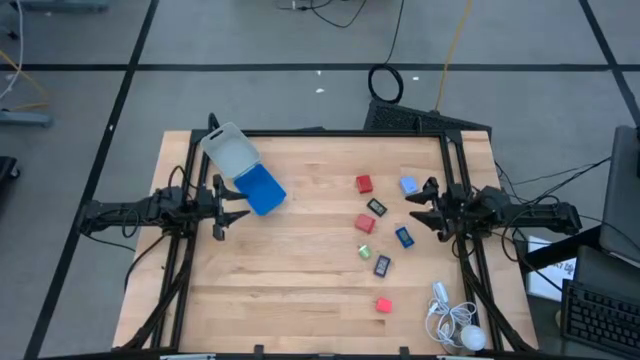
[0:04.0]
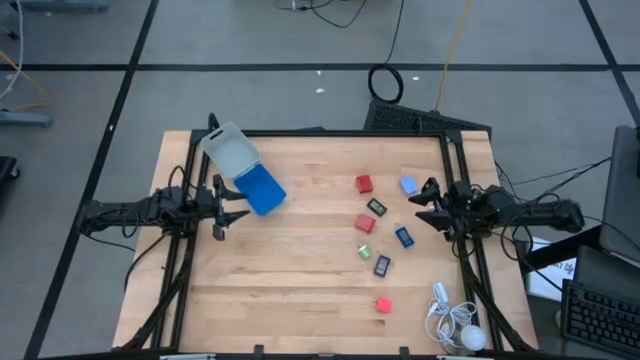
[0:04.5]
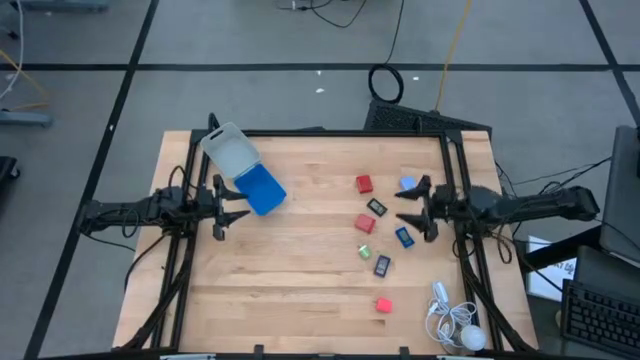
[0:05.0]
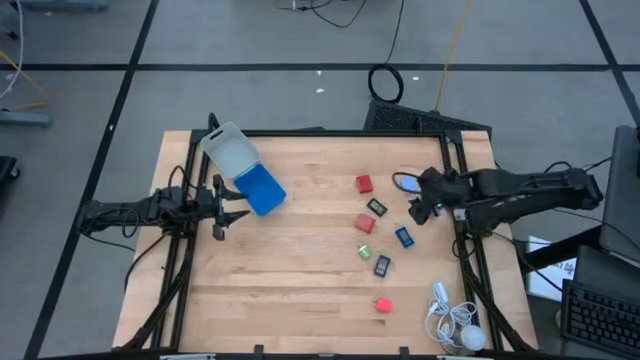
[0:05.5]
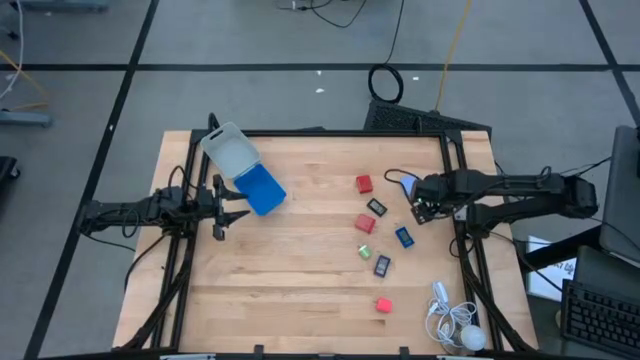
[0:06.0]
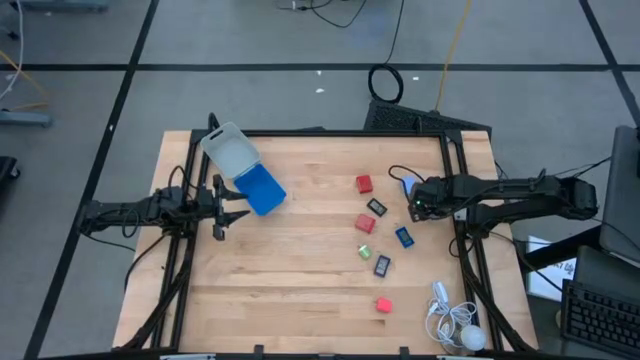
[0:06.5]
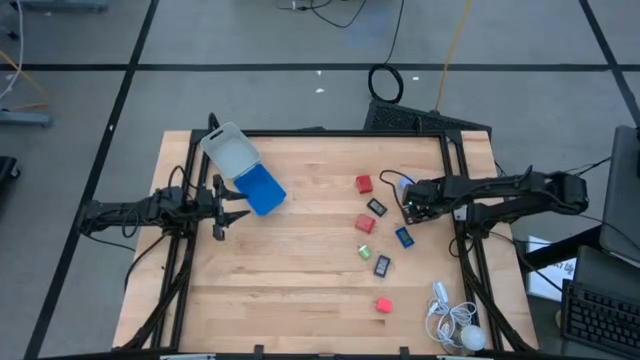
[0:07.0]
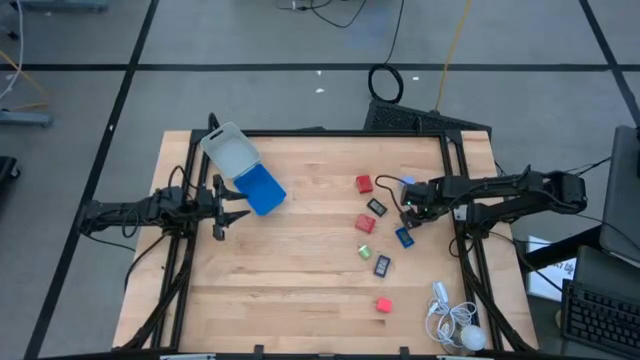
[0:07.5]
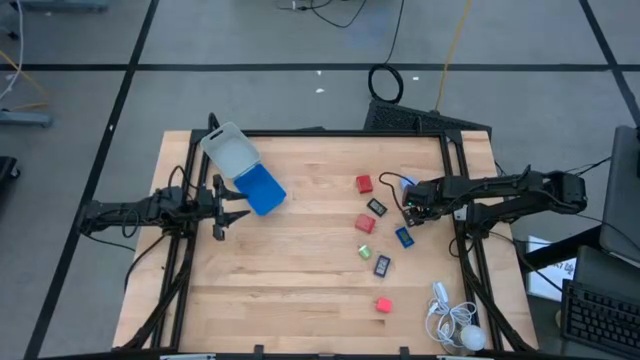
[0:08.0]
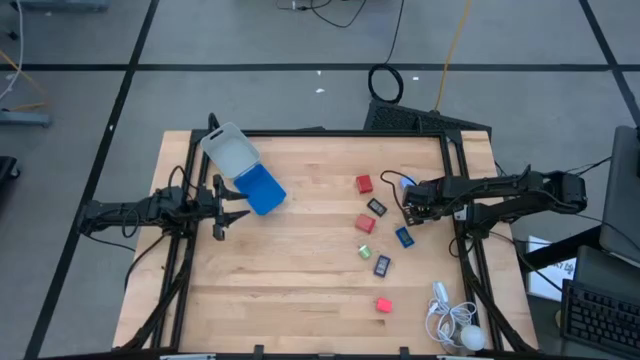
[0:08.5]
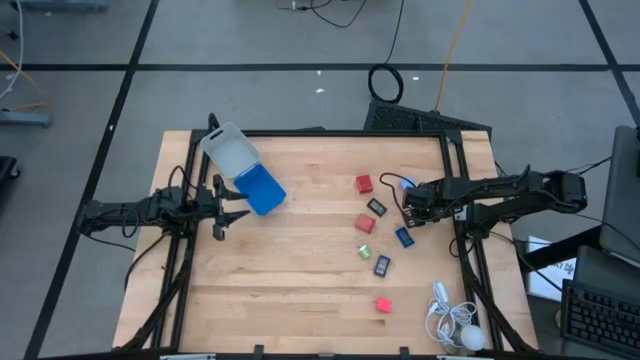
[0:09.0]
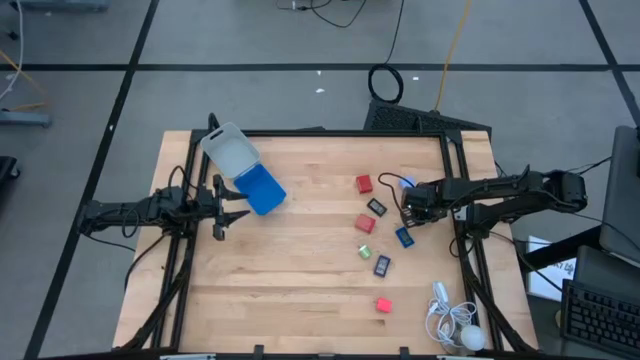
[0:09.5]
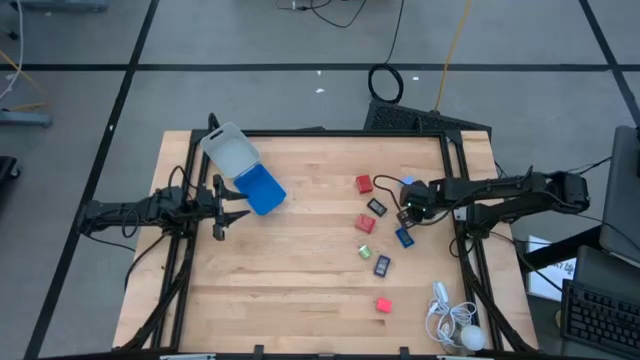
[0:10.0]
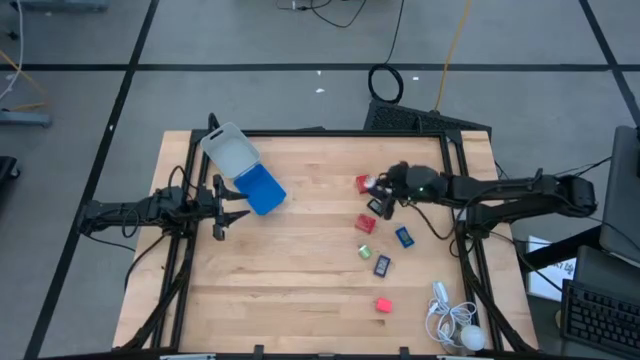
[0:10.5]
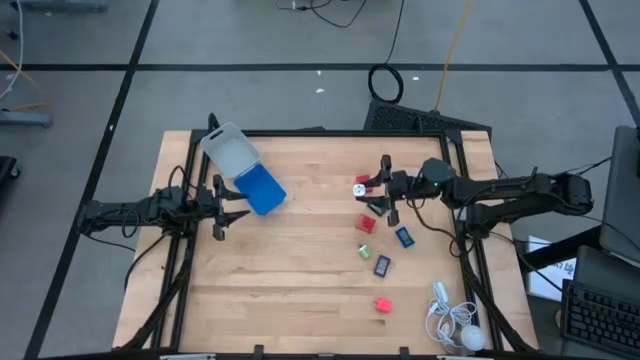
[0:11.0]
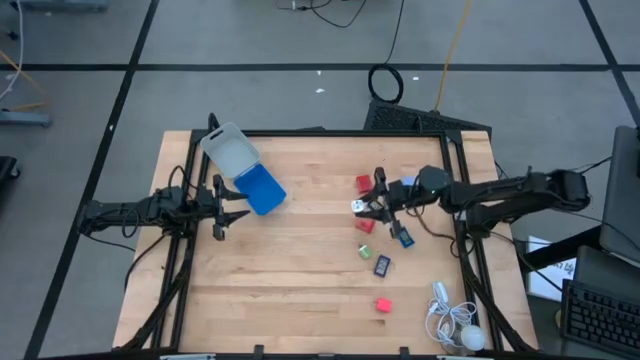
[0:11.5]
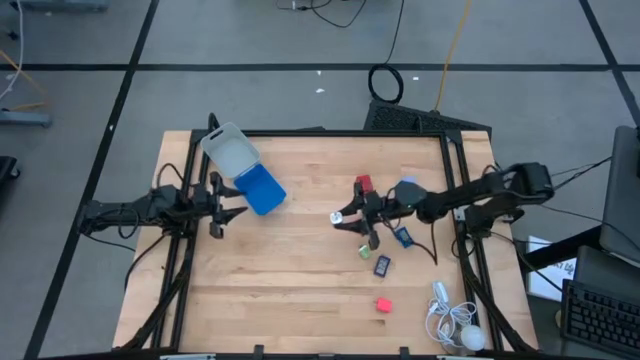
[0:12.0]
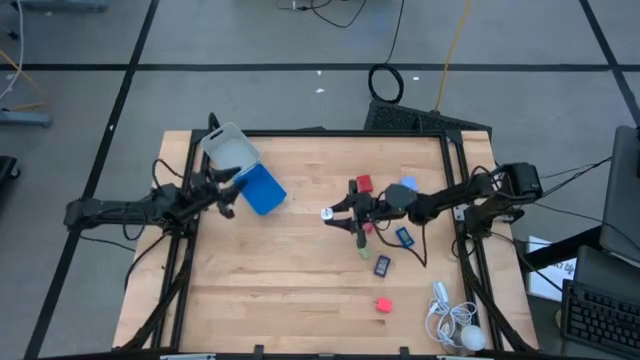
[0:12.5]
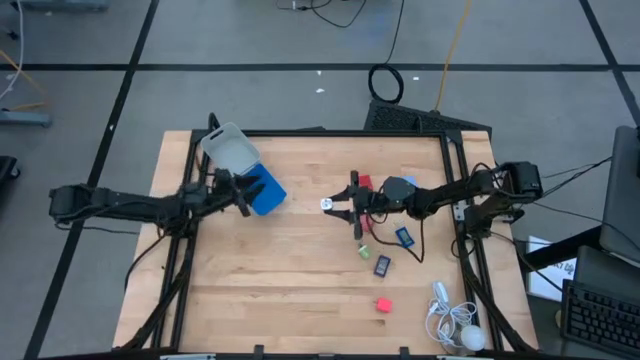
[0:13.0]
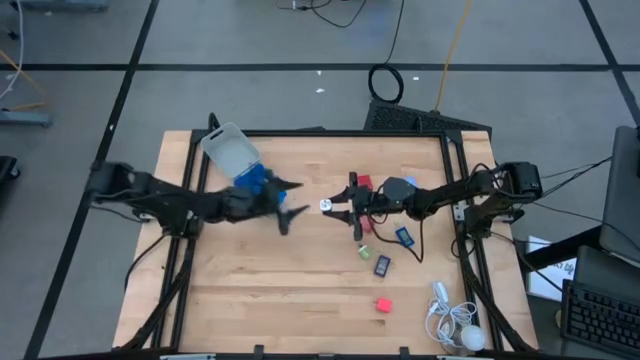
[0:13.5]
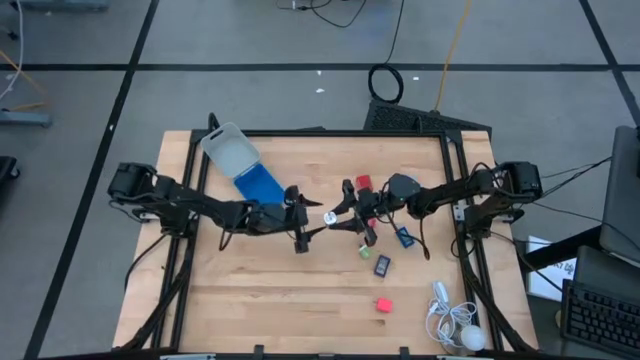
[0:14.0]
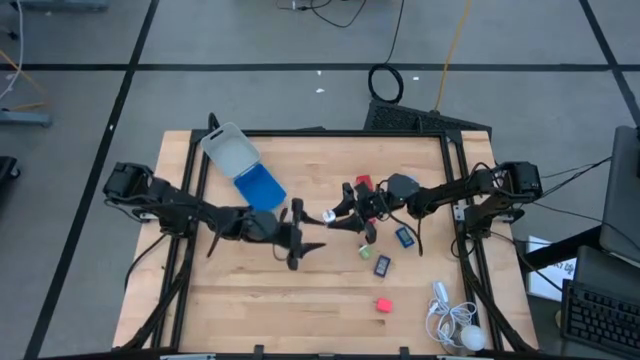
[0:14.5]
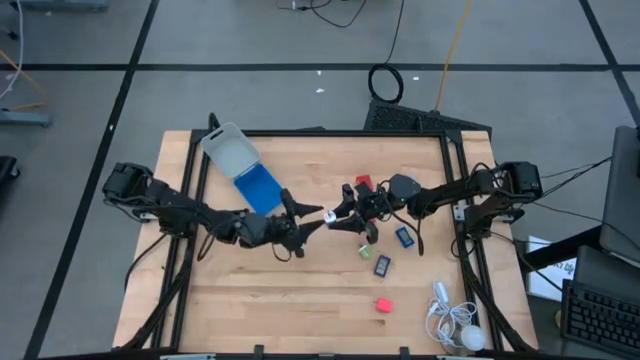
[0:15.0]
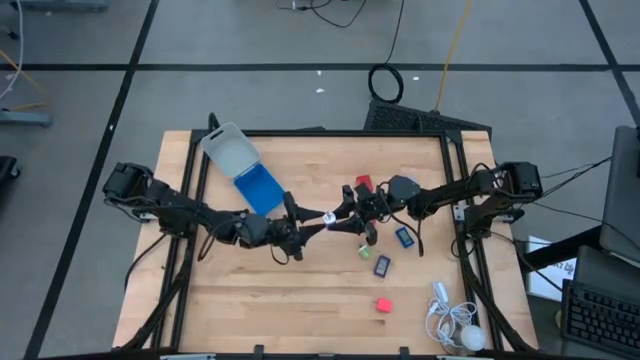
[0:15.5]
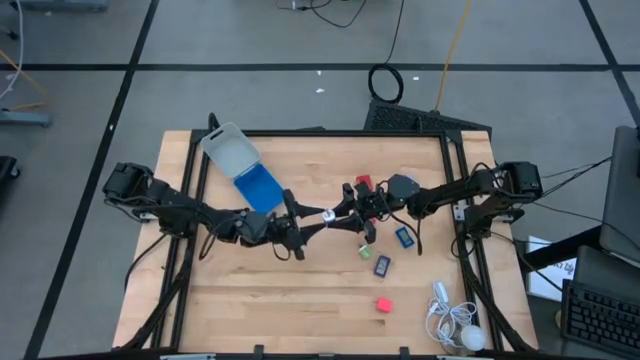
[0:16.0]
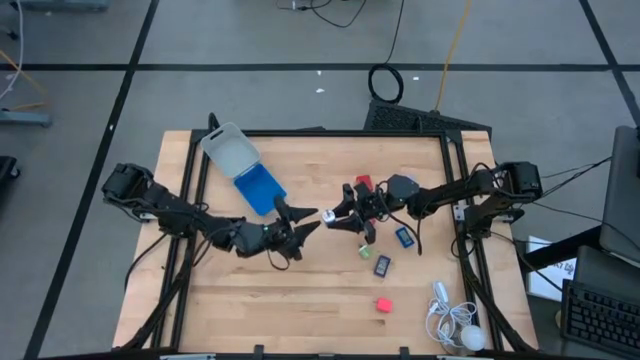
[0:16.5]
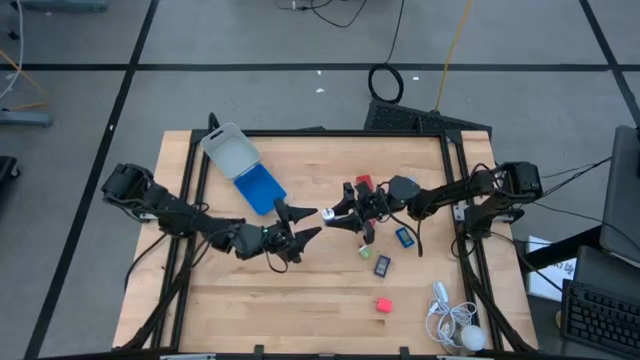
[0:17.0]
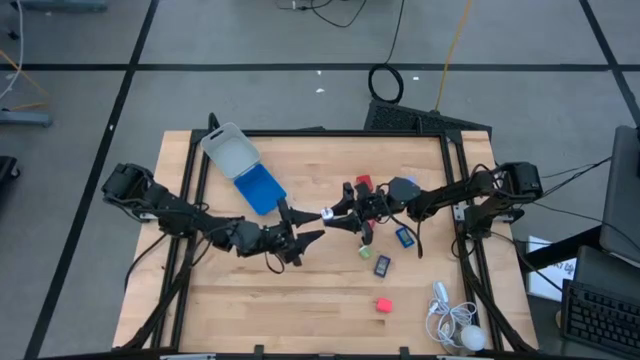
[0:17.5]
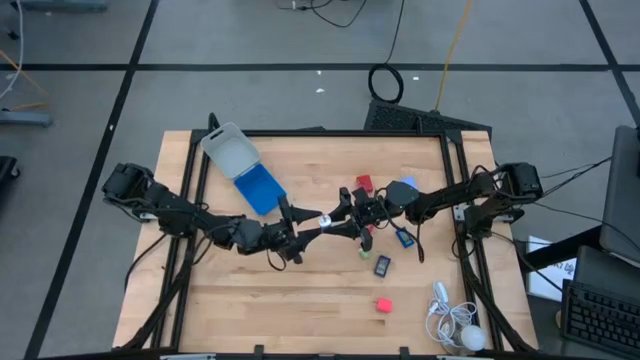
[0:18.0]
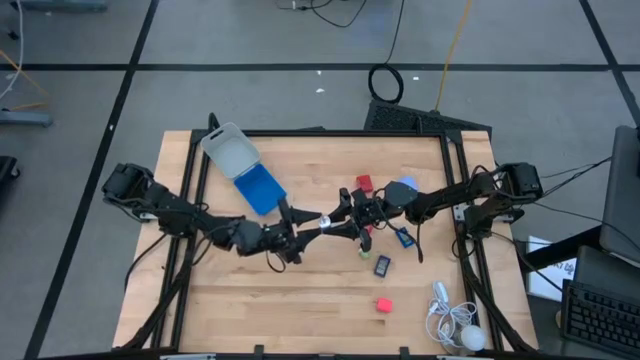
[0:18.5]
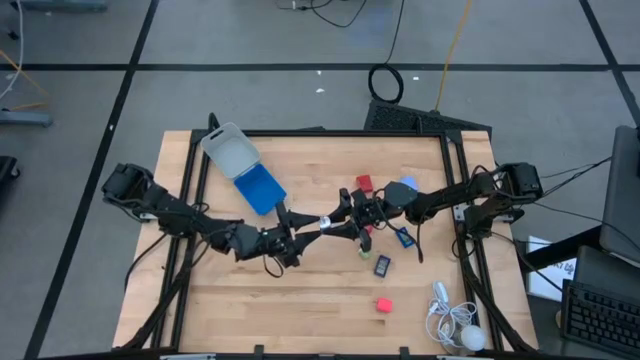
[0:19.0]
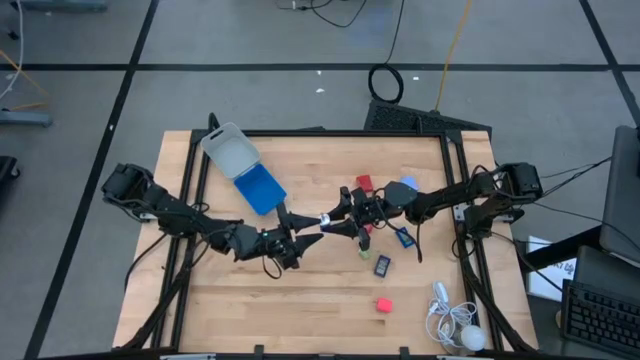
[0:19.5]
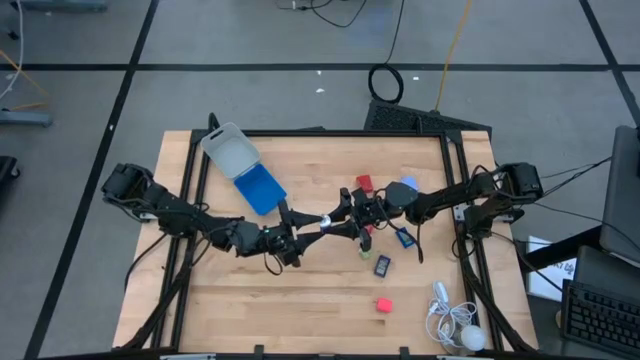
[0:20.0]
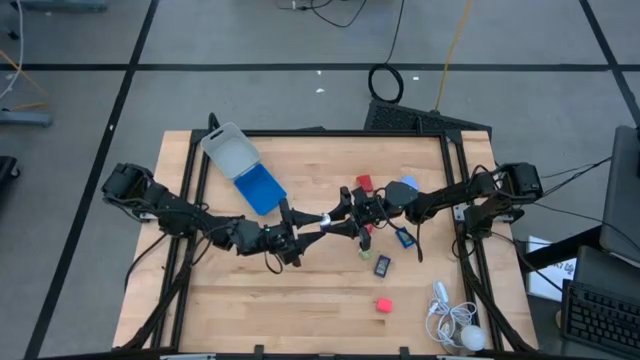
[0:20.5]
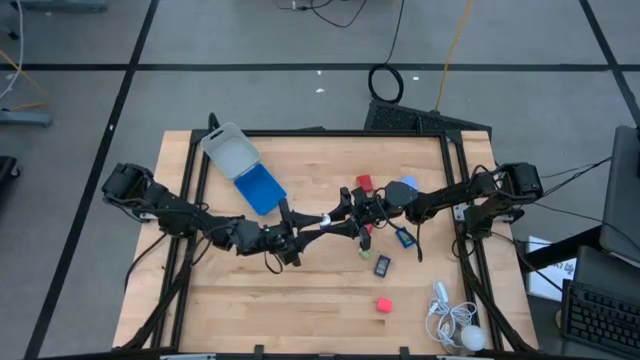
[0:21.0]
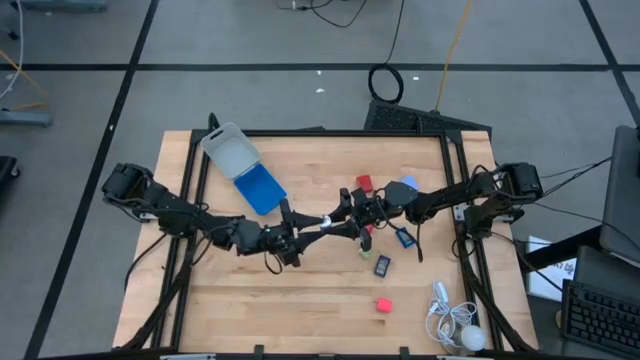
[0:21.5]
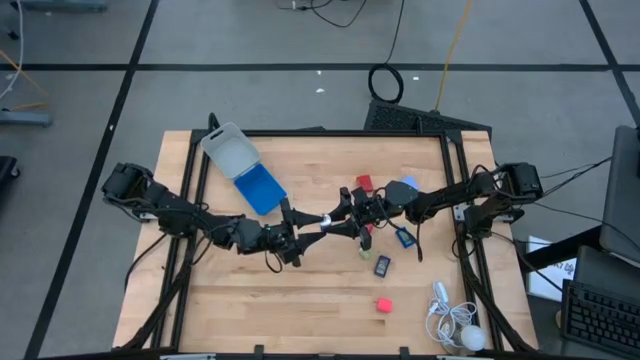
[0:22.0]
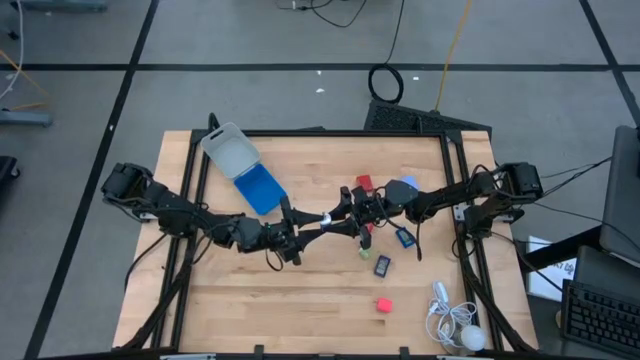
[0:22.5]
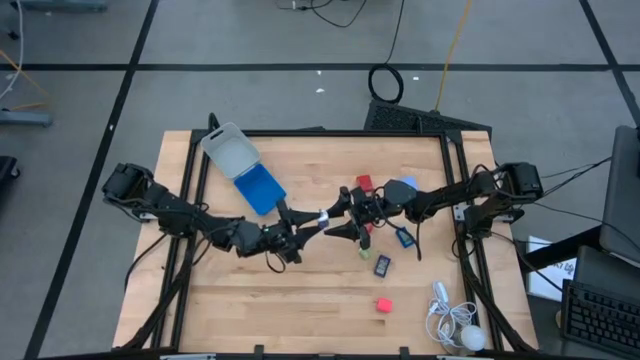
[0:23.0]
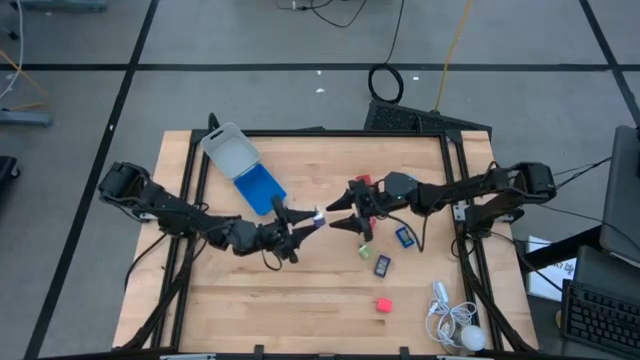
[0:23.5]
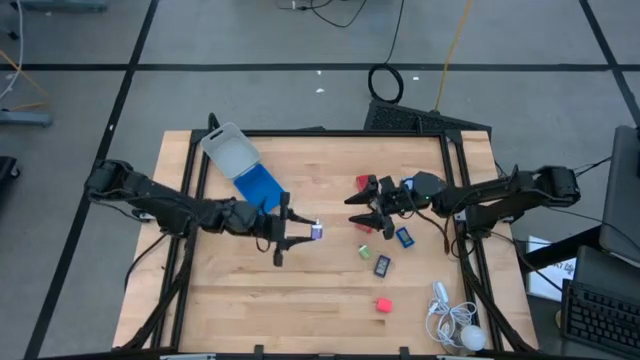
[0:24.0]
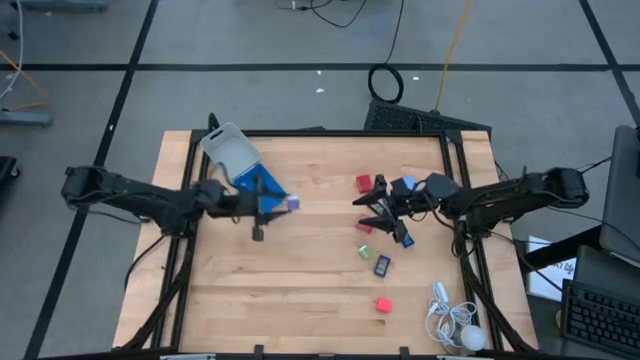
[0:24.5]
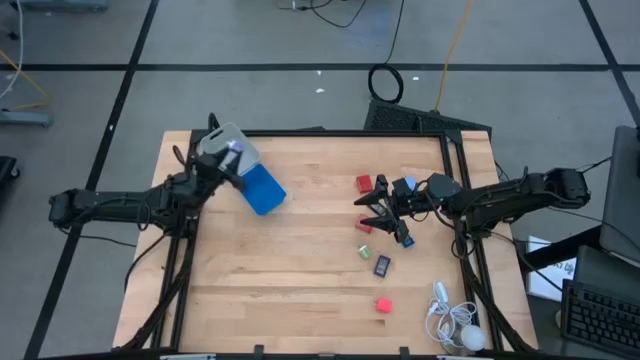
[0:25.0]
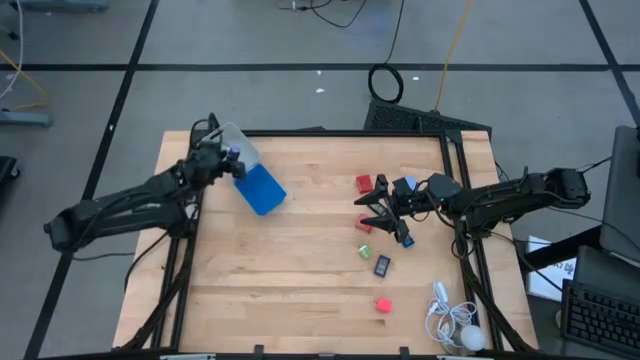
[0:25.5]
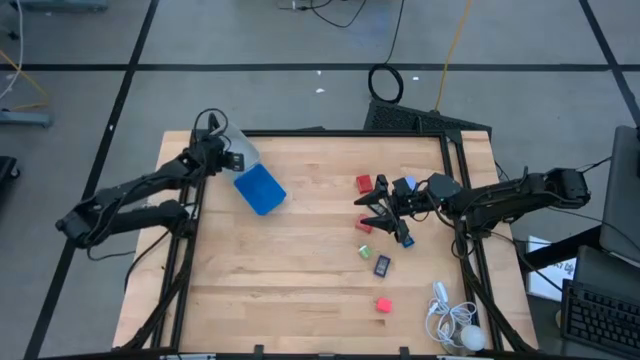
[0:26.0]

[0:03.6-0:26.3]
Task: Pick & Place Office items
Put the violet charger adapter into the gray bin
